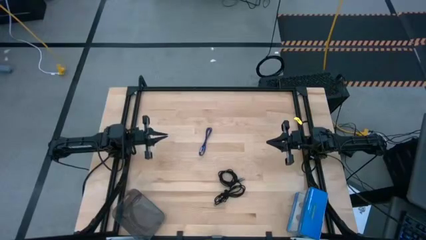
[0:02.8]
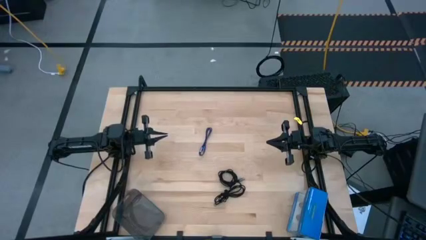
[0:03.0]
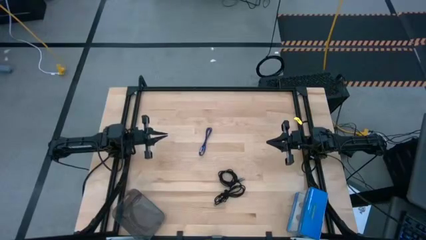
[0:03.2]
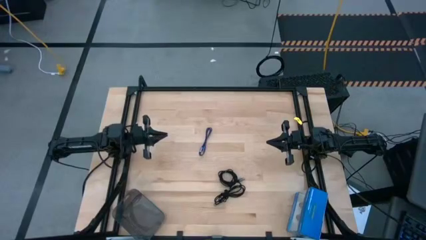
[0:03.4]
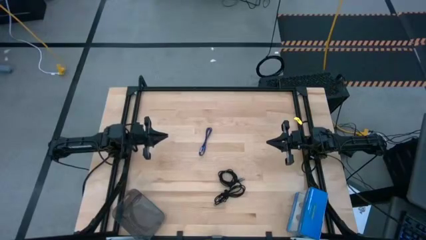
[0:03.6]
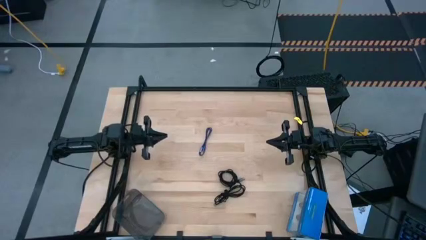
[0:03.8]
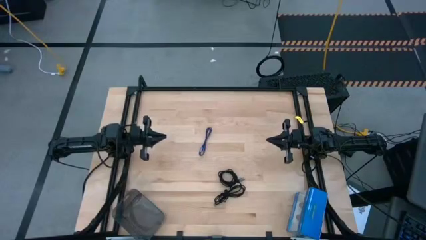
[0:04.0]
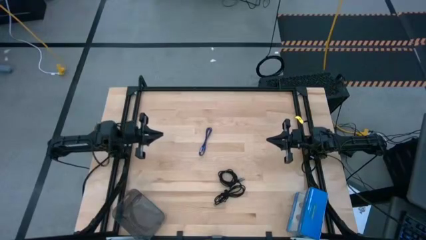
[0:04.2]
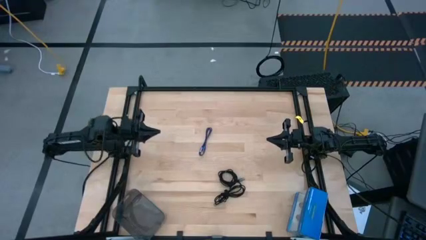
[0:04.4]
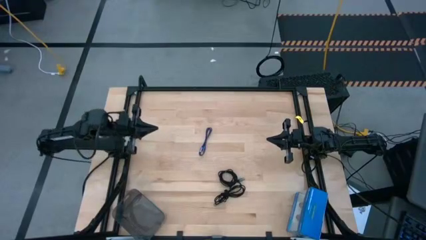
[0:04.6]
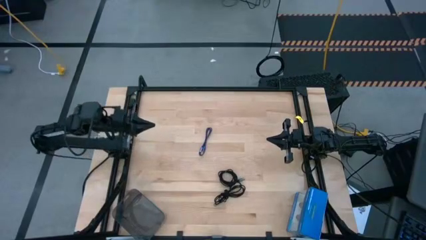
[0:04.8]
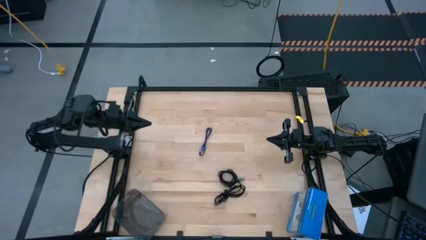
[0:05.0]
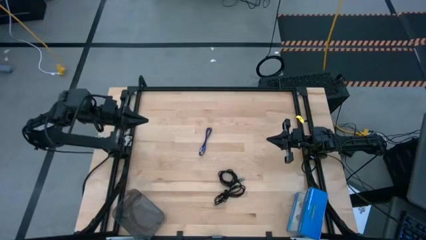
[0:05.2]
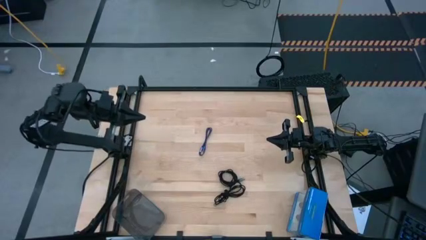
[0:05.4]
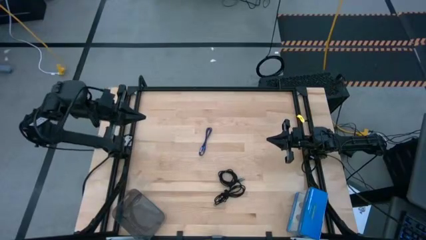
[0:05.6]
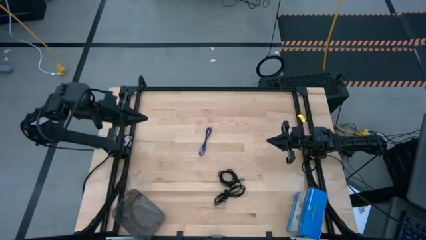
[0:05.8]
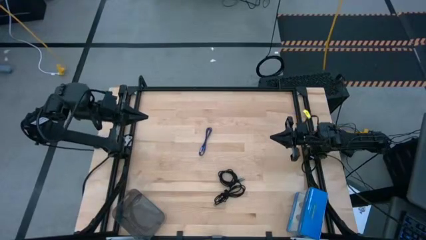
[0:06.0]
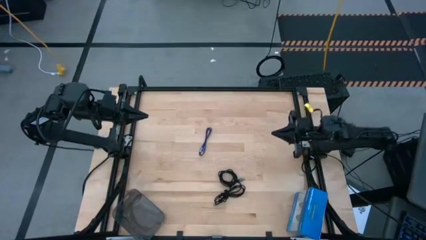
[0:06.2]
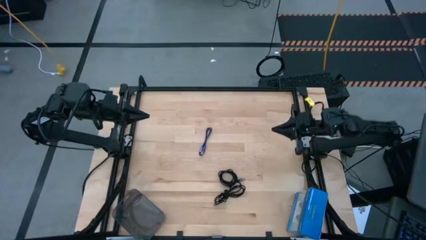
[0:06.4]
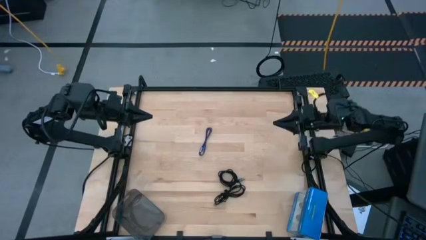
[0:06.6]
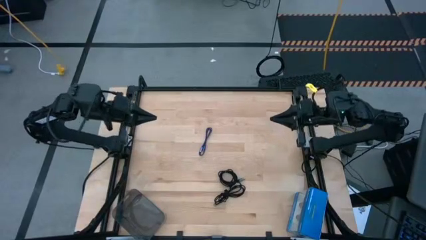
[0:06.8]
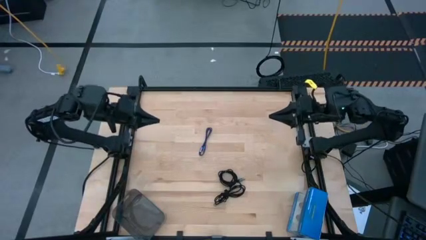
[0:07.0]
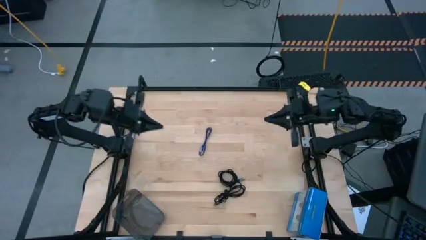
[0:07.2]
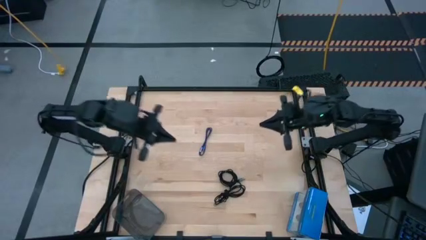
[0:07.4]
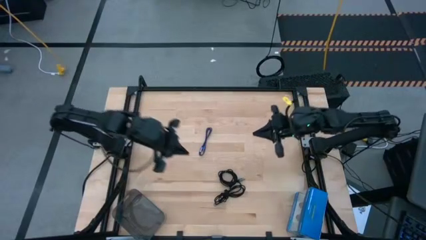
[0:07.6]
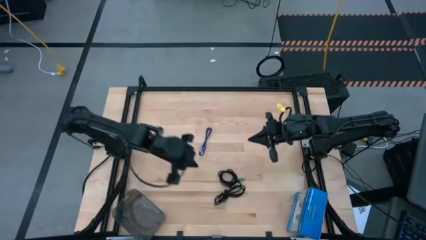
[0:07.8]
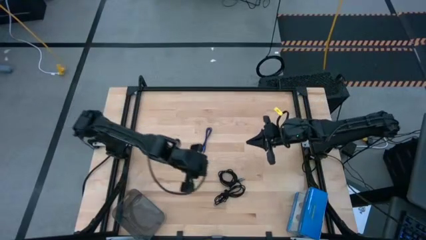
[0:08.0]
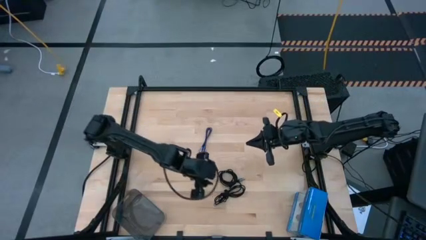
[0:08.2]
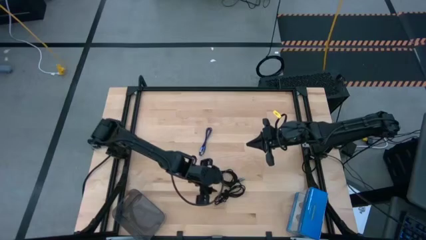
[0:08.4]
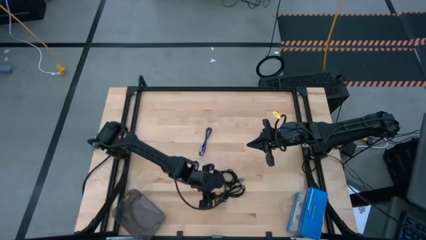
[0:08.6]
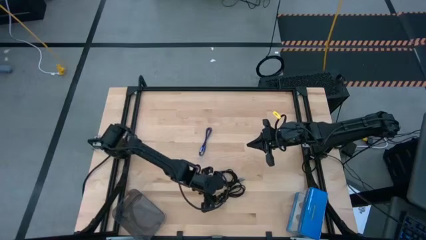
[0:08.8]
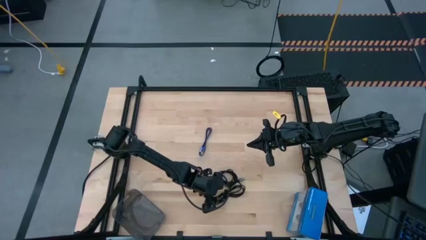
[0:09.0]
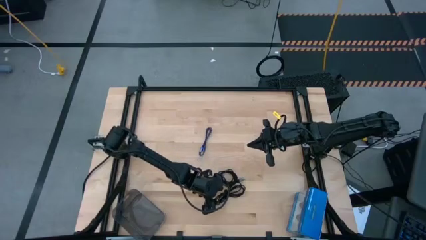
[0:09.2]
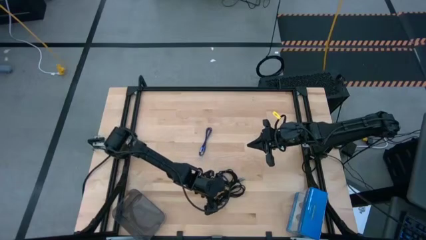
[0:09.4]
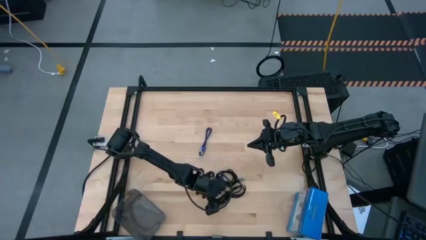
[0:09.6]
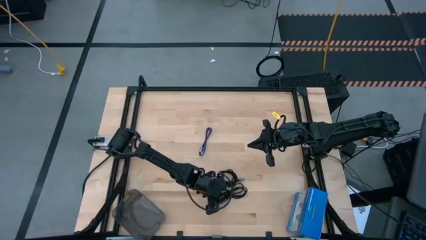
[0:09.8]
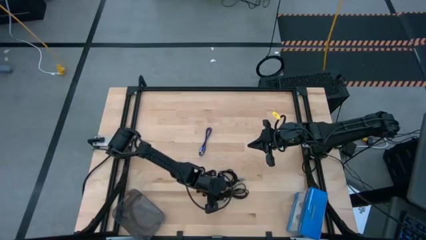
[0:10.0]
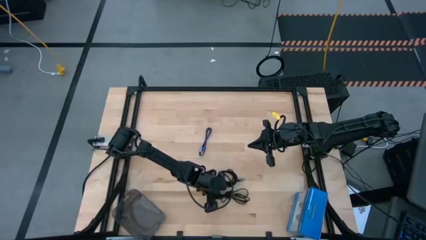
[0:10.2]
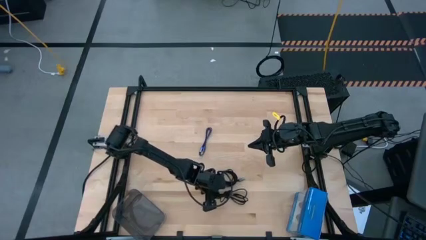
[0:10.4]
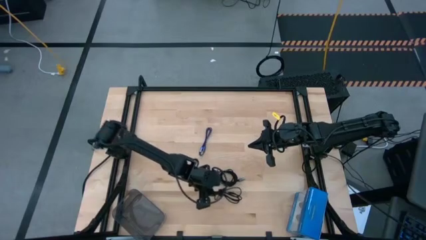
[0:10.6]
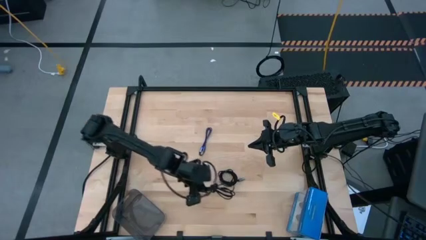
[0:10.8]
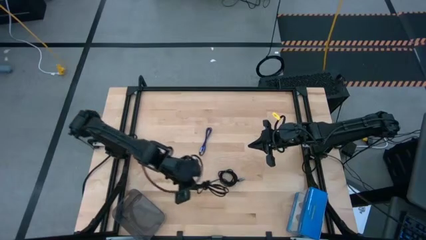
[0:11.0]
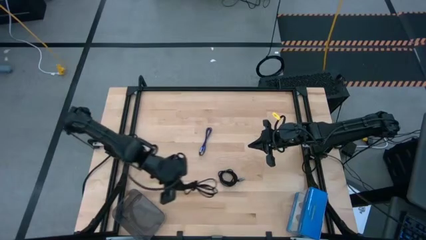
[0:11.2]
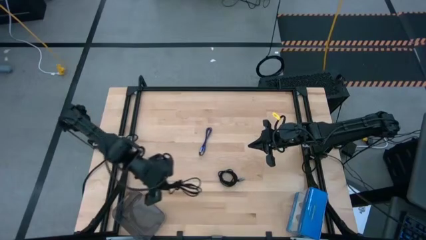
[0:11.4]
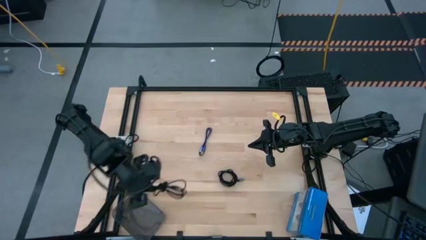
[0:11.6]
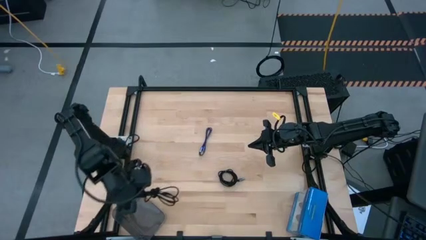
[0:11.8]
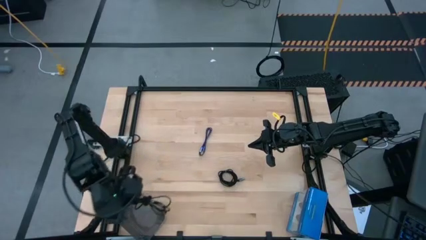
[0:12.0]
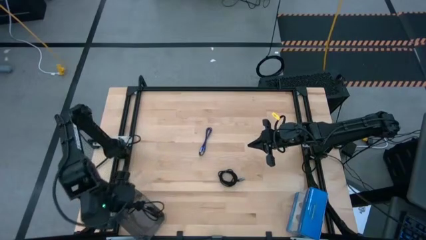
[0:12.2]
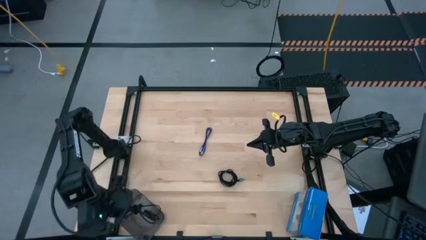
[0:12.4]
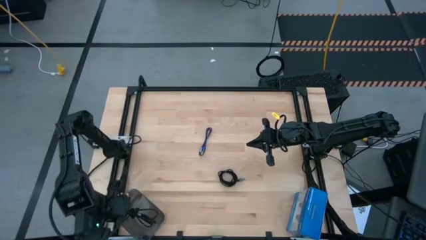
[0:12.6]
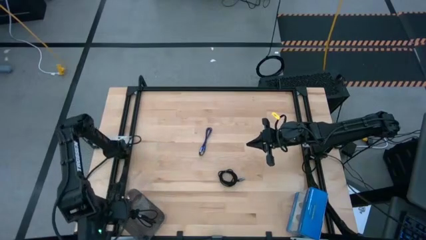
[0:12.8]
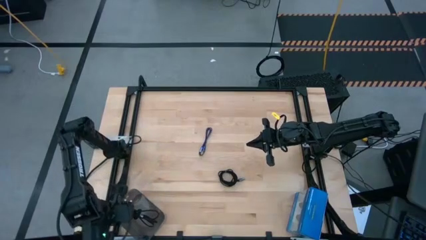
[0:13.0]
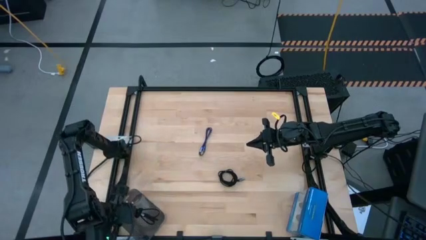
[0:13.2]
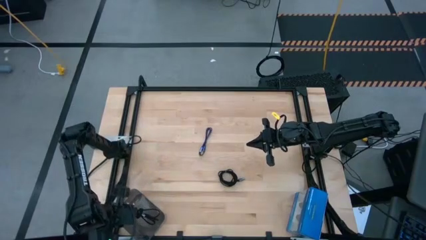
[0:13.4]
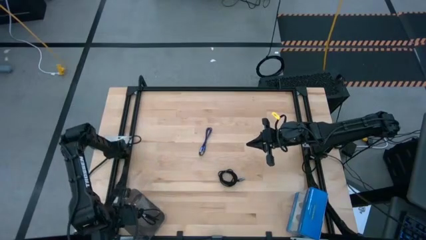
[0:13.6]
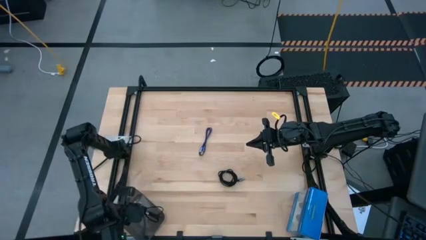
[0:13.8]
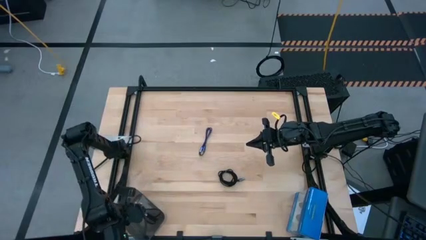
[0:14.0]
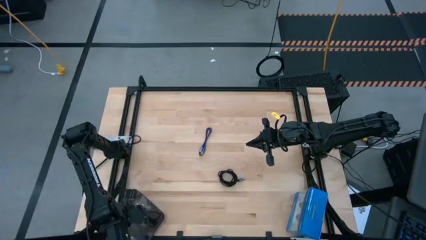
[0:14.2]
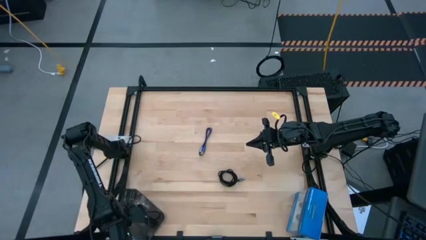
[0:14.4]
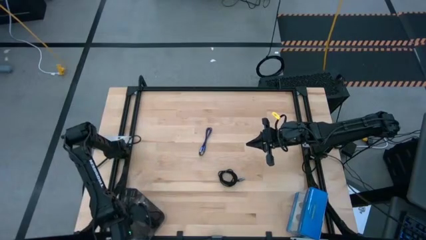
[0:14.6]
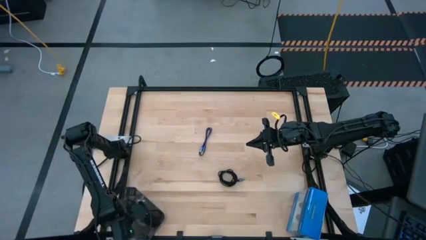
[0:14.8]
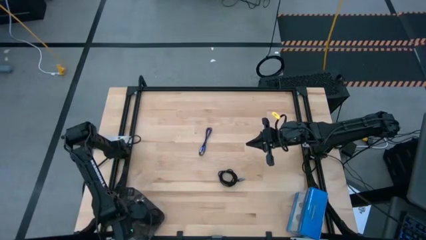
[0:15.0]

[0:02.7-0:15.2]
Task: Pick and place USB-C Cables
Put the bottom black charger cable into the black bin

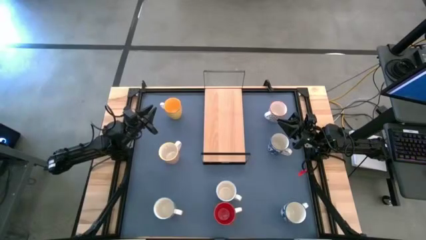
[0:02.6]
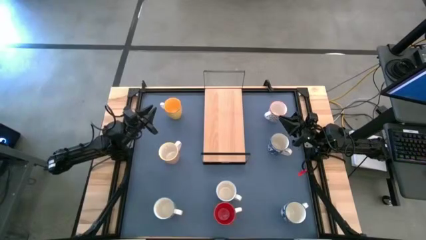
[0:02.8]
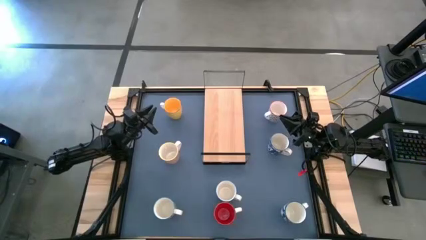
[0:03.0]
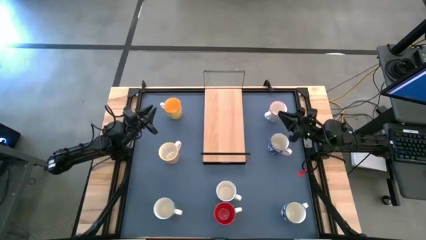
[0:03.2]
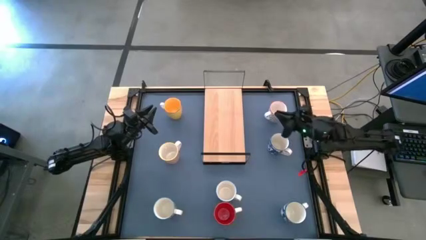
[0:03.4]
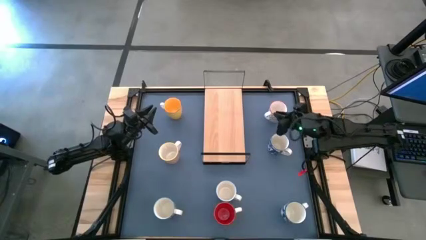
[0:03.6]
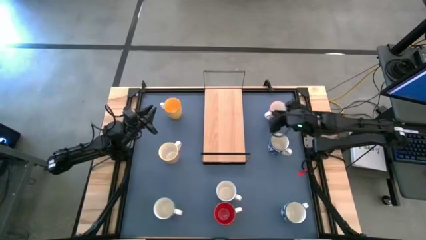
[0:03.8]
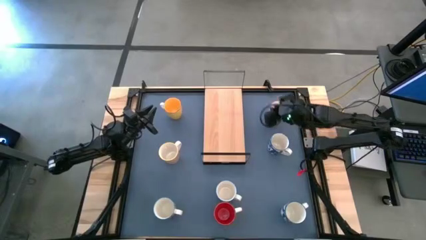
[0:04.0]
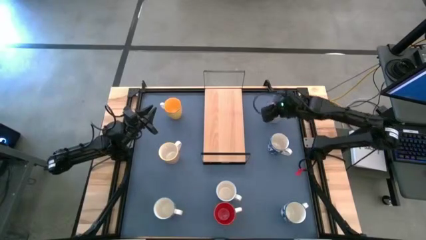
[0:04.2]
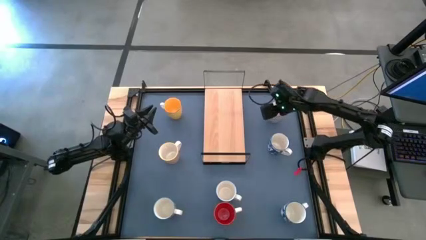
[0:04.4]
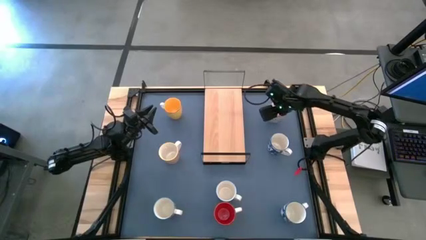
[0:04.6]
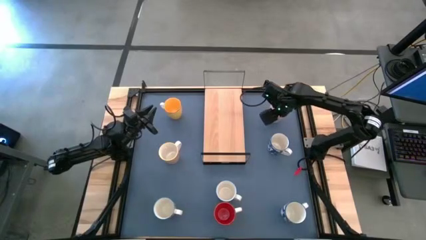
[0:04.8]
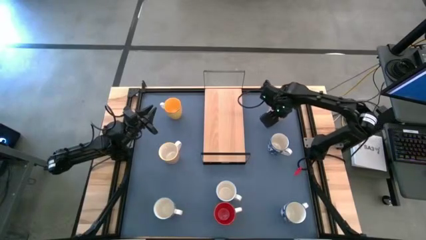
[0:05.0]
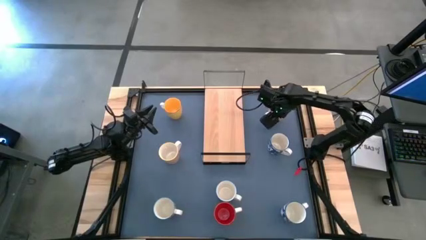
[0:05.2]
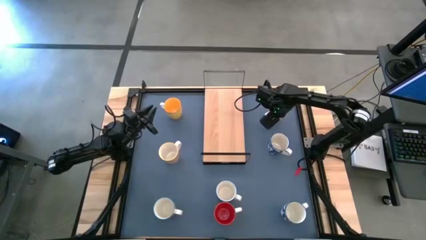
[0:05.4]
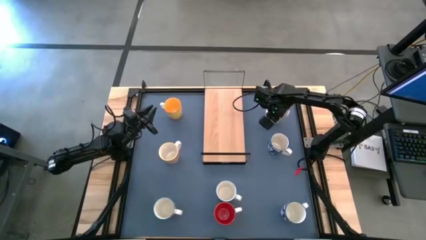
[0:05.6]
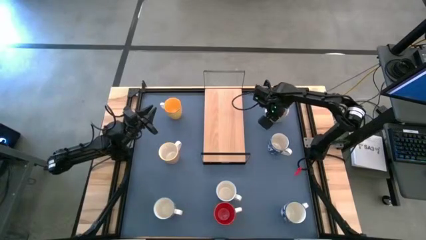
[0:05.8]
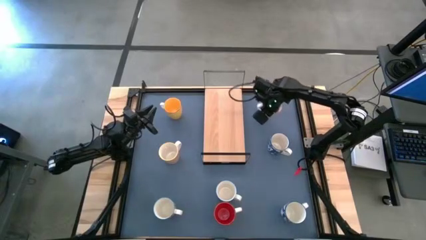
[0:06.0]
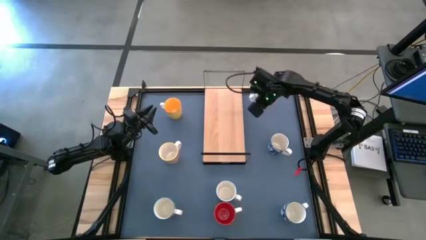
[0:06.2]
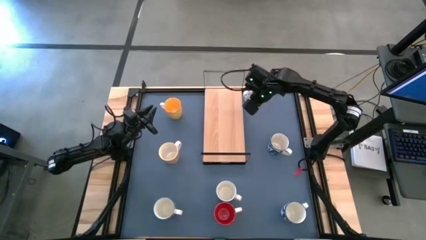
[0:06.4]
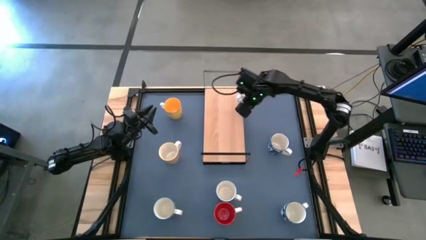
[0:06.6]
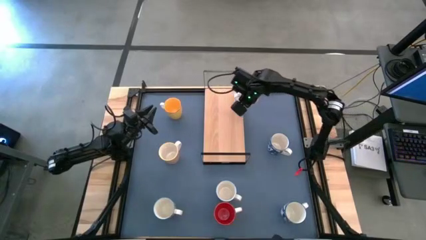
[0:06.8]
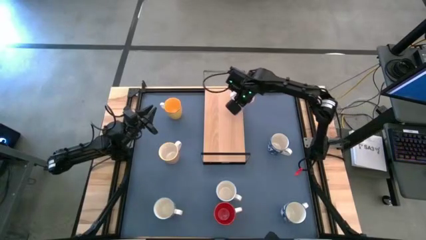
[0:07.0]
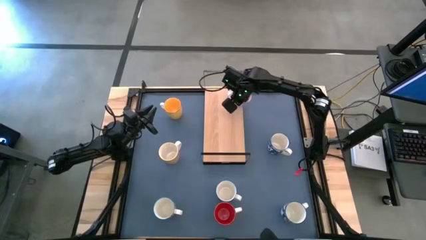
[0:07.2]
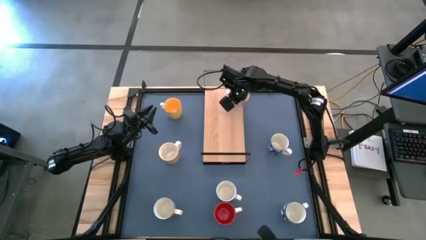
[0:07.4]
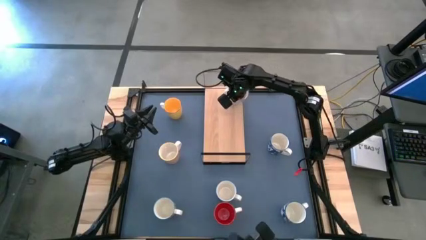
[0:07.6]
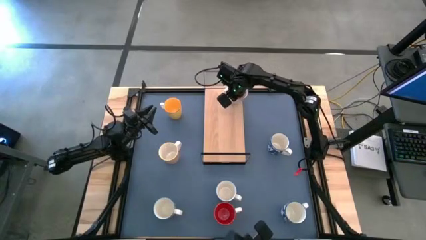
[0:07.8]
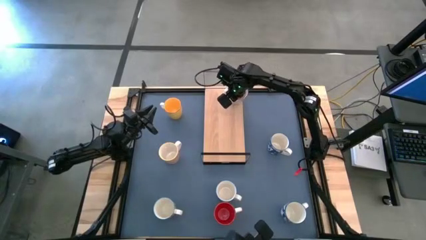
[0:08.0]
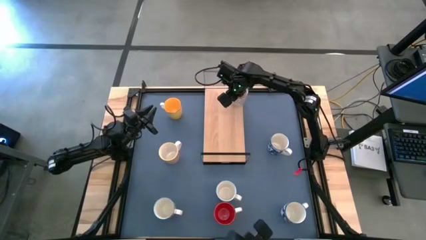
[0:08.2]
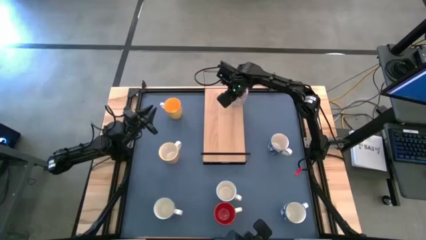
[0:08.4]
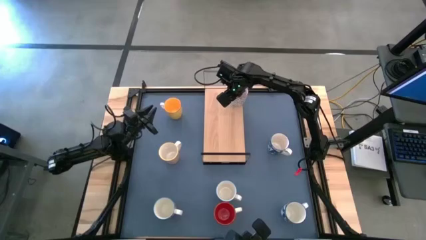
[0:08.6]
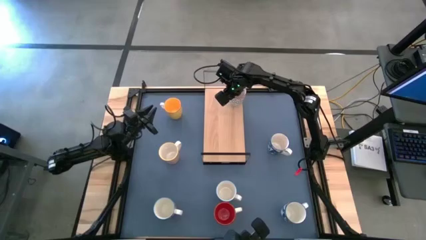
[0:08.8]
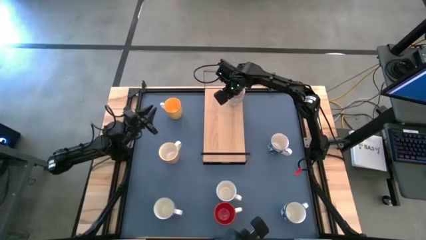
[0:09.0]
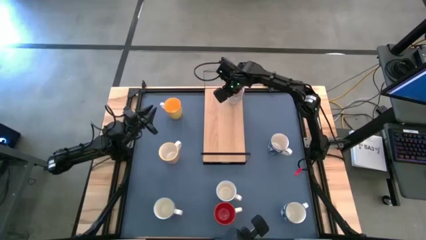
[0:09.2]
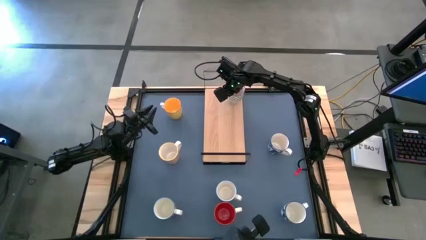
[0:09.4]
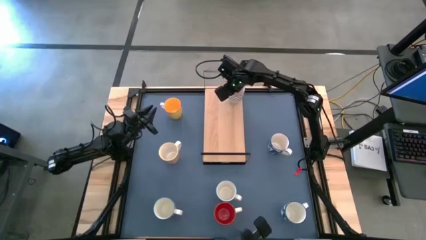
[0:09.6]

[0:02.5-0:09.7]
Task: Place coffee mugs
Put the gray mug on the shelf
